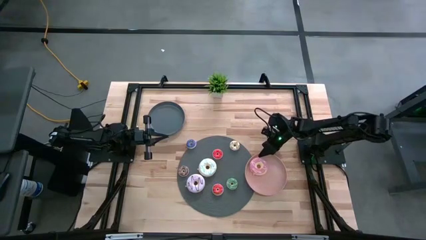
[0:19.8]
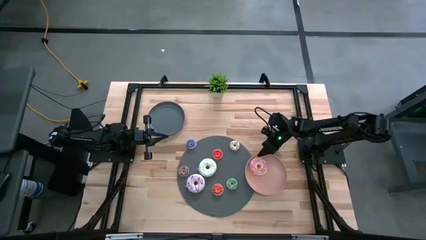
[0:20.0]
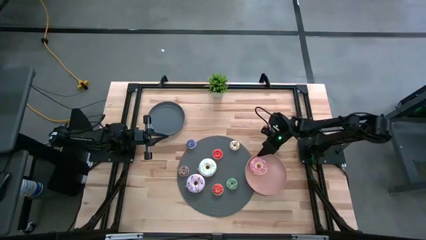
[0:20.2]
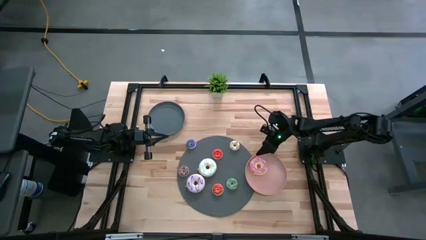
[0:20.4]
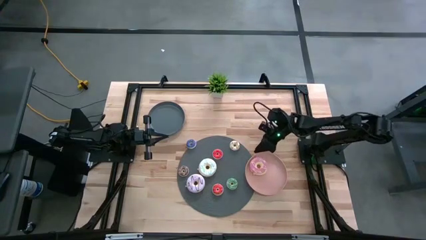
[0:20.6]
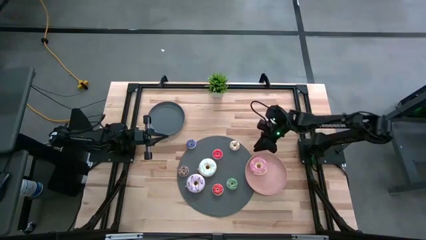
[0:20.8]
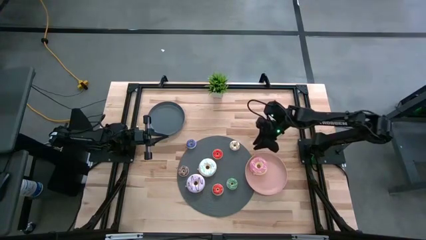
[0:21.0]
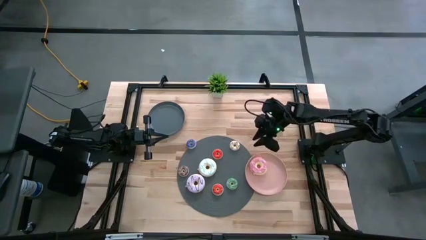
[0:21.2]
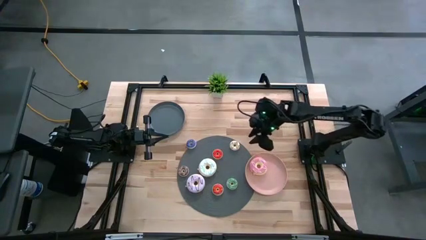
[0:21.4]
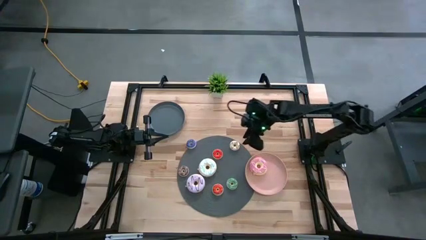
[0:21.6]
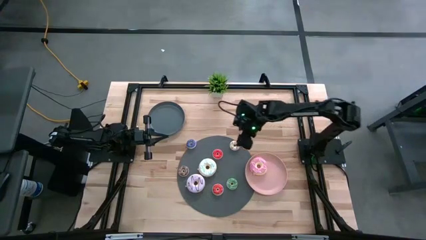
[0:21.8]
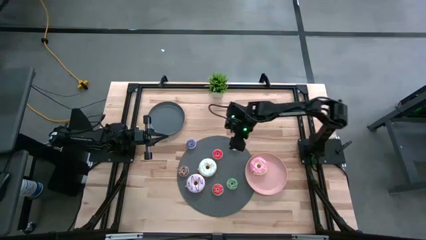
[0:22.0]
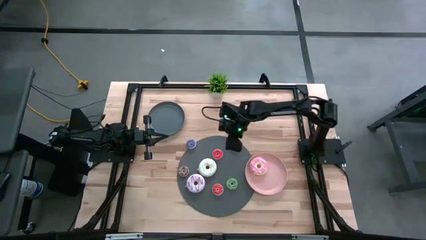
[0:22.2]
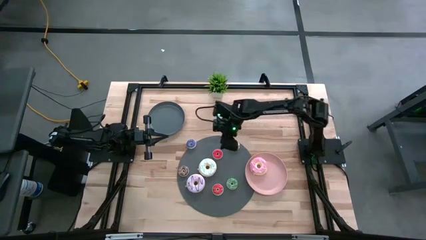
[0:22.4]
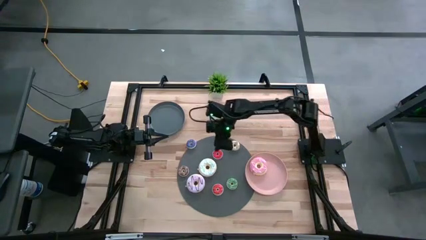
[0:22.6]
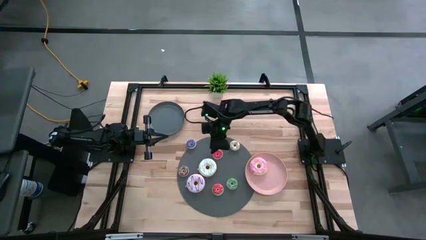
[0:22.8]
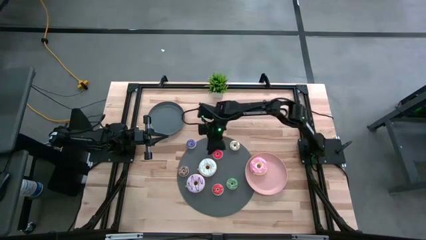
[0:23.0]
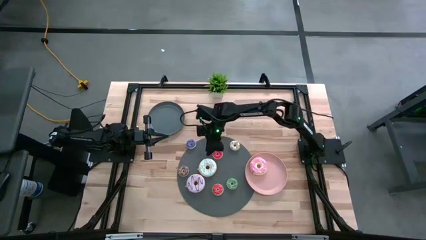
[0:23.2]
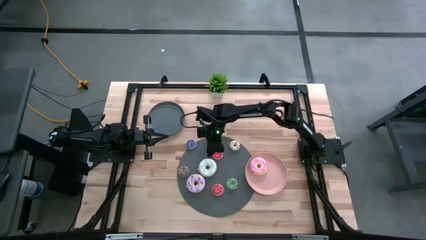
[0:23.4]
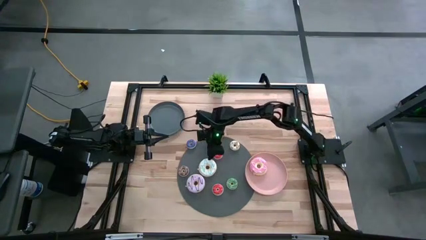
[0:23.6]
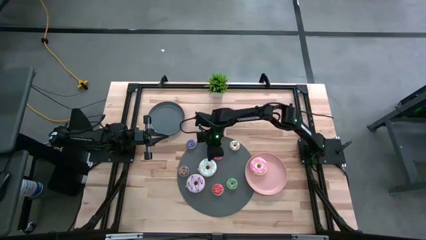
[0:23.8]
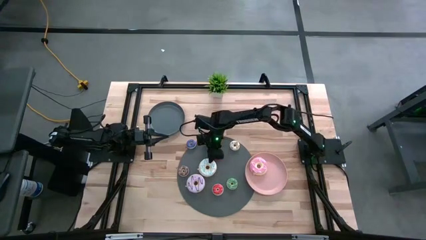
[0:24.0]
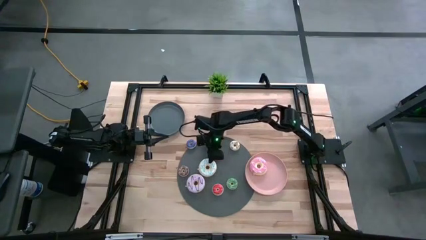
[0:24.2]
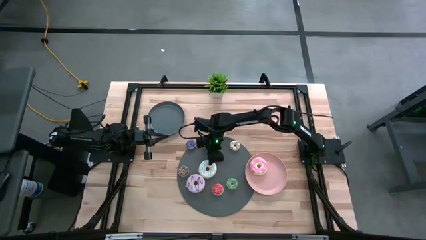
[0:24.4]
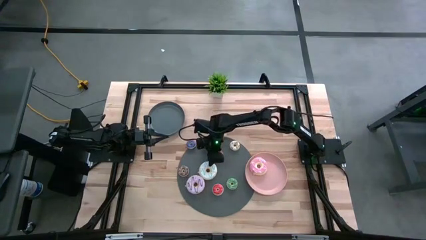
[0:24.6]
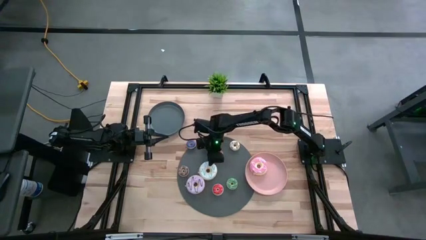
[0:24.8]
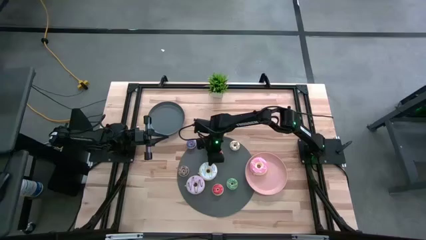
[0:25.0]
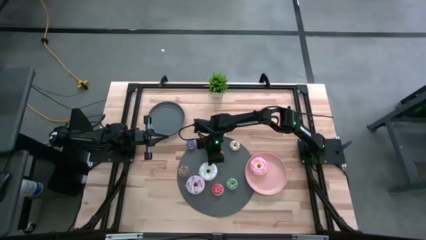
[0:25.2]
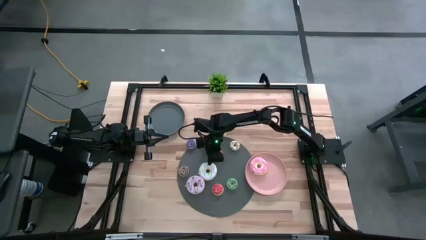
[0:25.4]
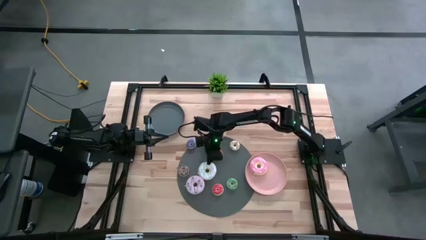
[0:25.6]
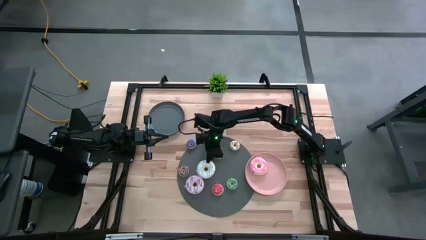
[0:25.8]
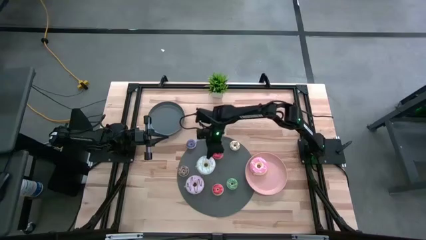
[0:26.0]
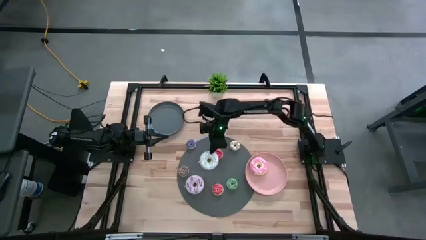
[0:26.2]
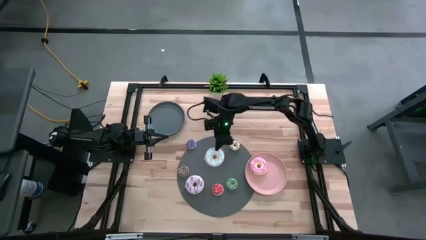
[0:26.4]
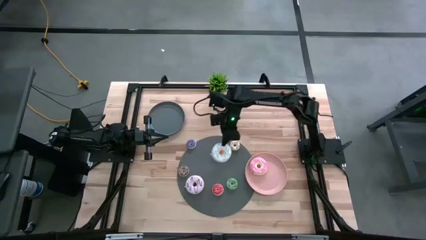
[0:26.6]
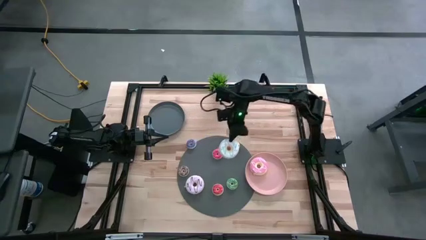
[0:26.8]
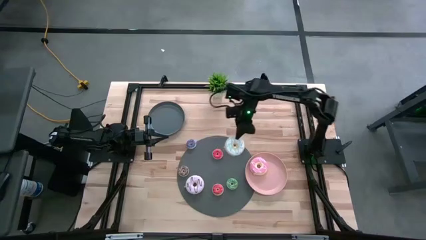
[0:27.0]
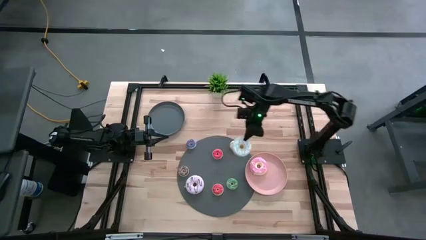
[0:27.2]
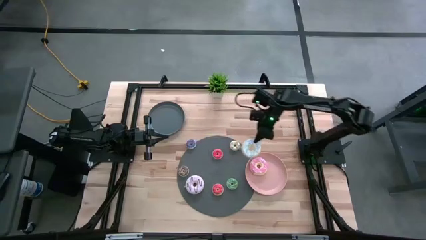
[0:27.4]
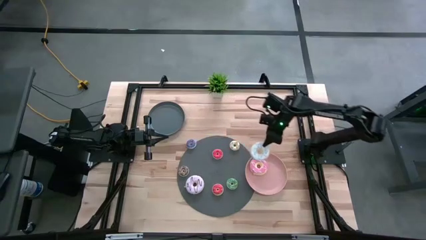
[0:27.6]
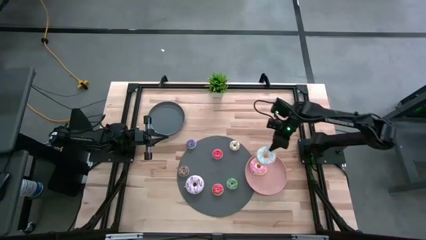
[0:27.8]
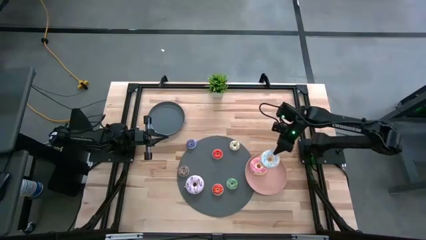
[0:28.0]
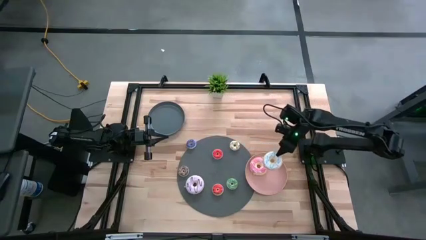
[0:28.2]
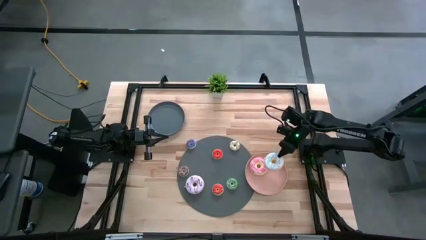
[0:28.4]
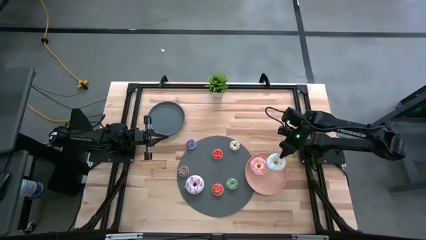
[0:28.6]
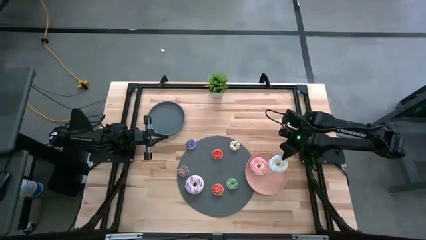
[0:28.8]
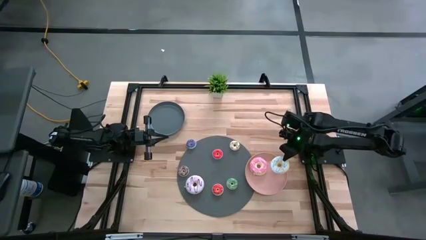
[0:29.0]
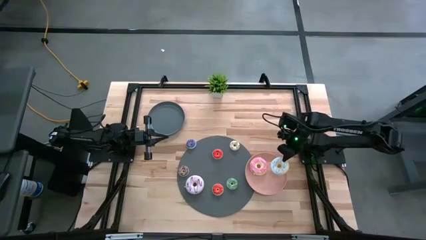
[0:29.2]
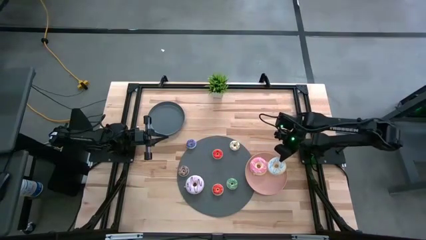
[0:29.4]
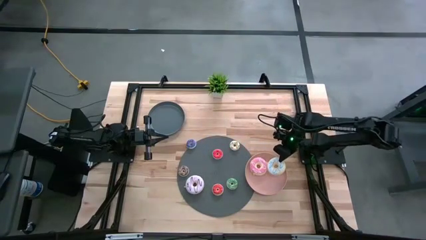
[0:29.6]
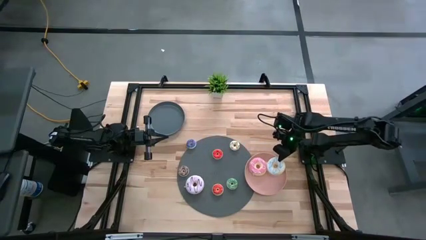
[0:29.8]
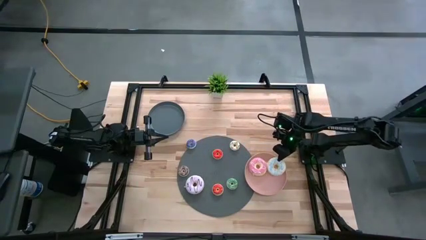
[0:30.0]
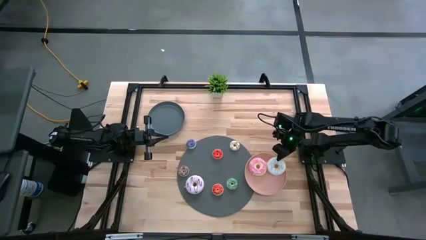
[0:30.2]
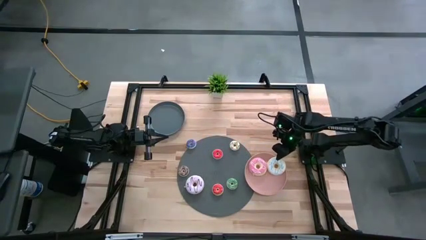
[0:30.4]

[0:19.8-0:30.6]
Task: Pick & Place donuts
Put the big white donut on the pink plate

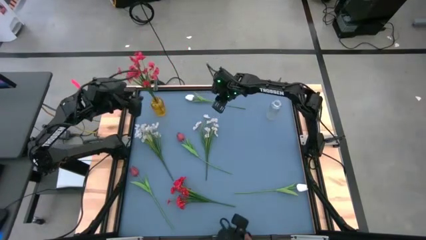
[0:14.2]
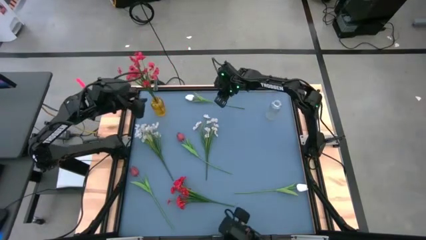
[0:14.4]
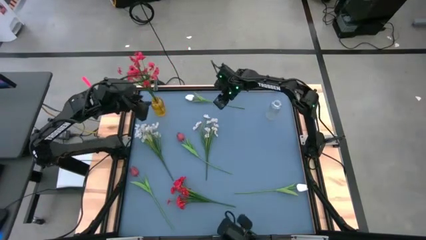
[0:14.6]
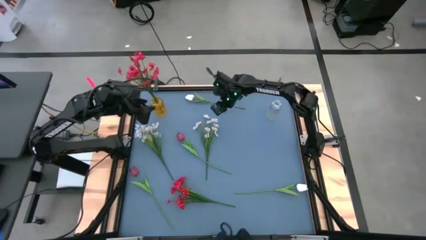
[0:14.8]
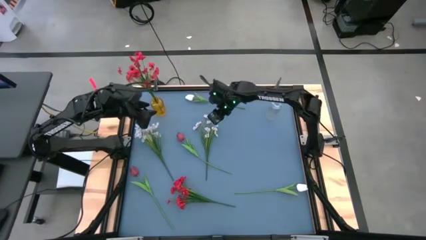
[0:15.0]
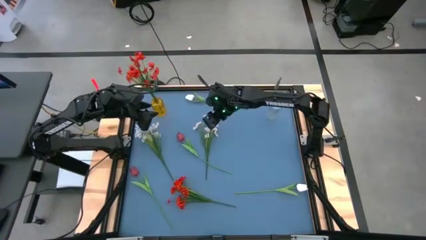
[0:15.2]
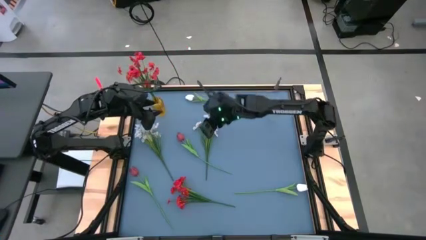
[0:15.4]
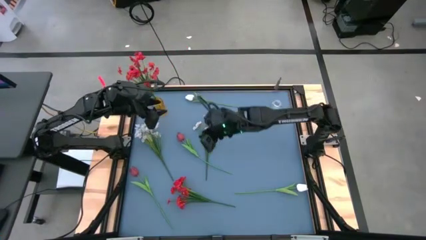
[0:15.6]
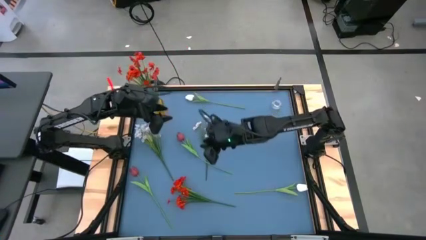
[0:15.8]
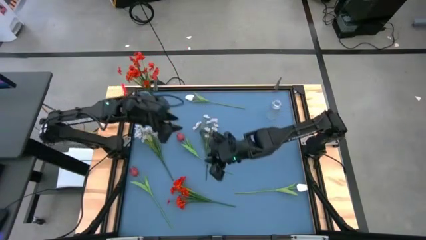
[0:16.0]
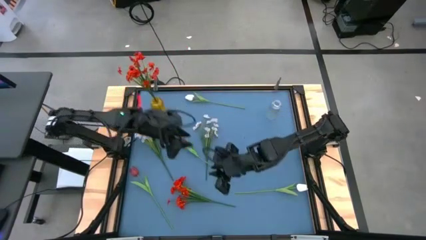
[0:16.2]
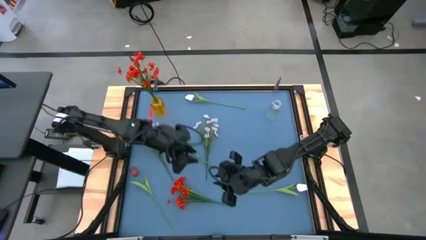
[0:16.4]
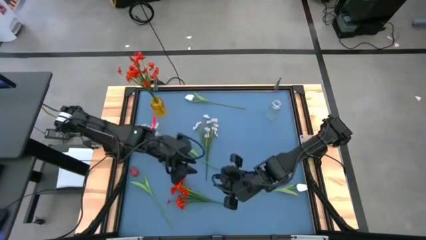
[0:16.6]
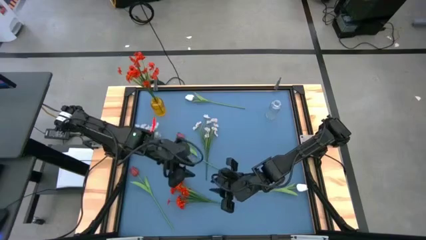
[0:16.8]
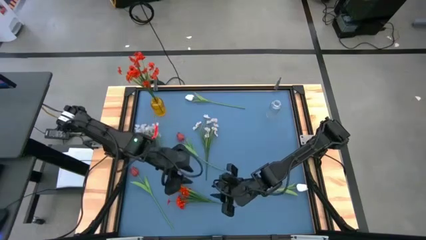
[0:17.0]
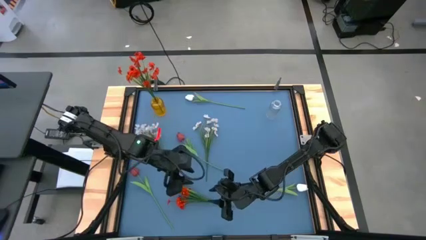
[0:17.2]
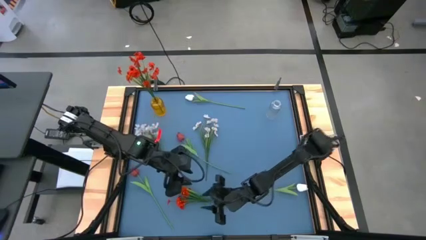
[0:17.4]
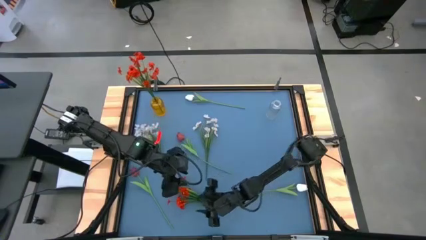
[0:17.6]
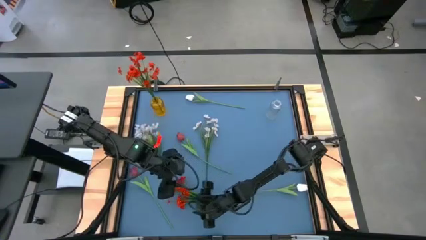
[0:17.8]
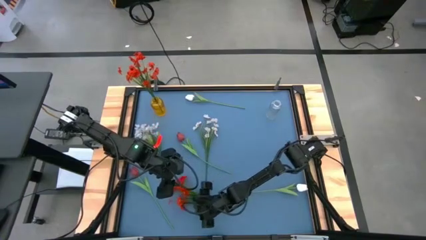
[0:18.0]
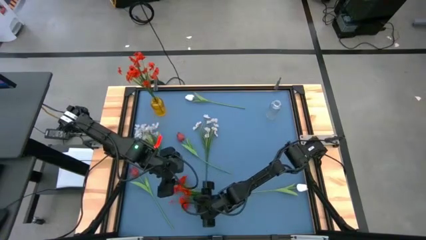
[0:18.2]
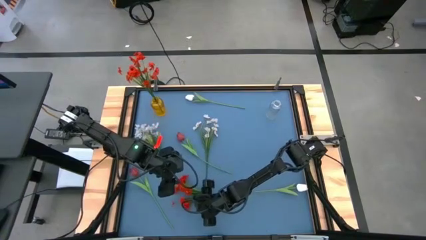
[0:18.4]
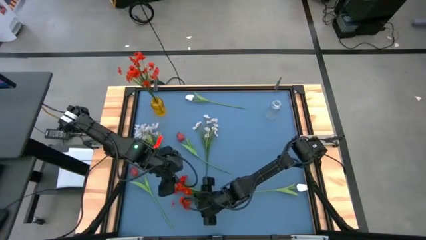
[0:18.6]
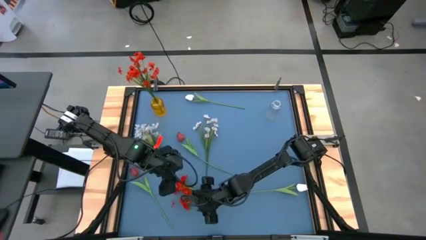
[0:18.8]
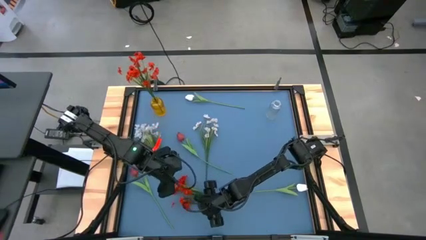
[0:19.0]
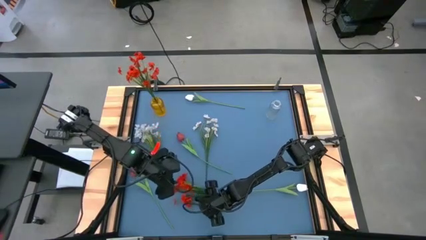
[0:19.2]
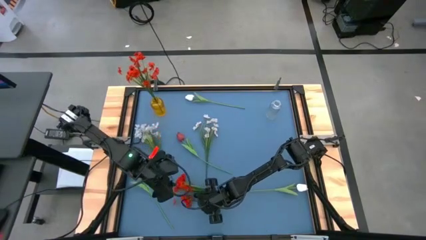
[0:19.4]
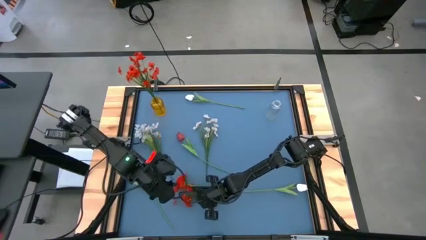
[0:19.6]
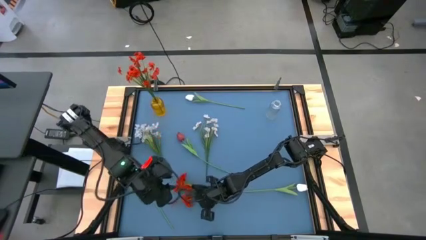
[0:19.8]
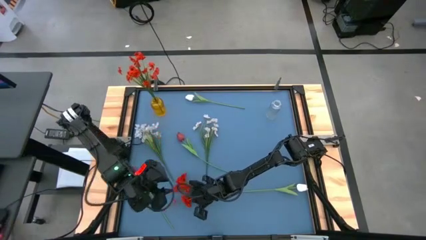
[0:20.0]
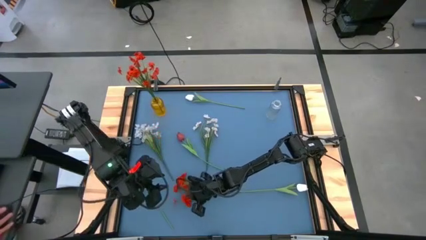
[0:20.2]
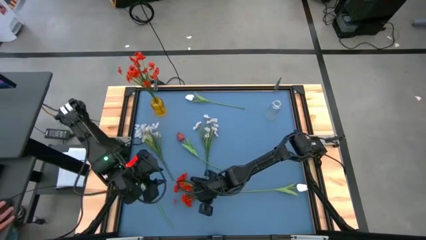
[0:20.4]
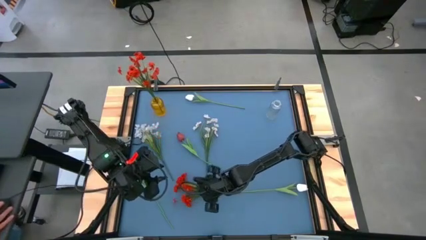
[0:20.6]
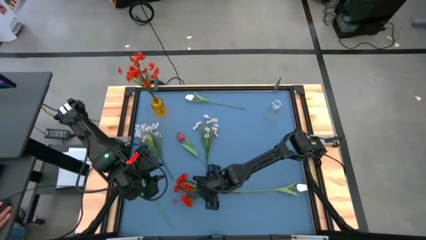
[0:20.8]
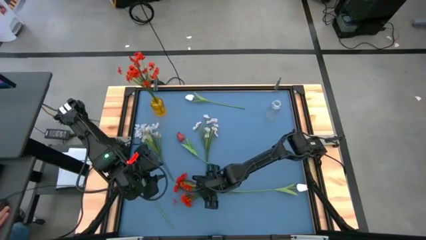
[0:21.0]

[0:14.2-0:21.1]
Task: Sort flowers into vase by color
Put the red flowers into the yellow transparent flower vase
